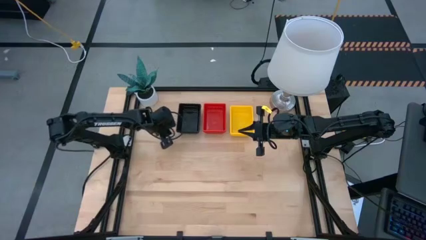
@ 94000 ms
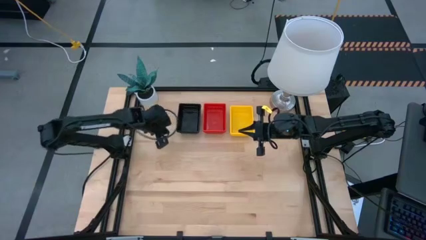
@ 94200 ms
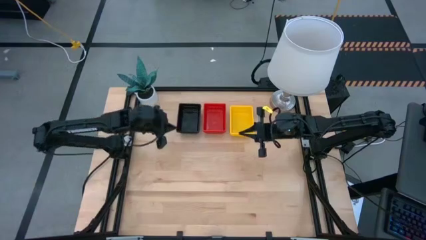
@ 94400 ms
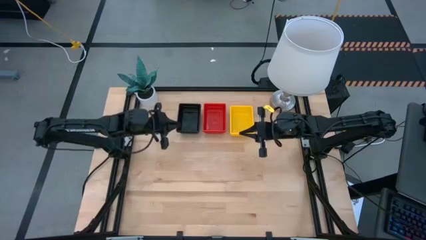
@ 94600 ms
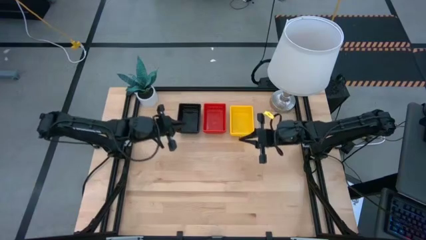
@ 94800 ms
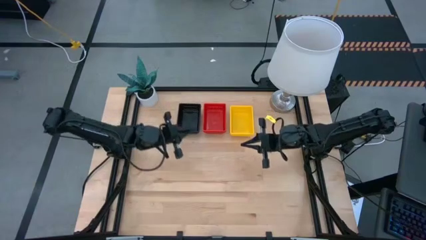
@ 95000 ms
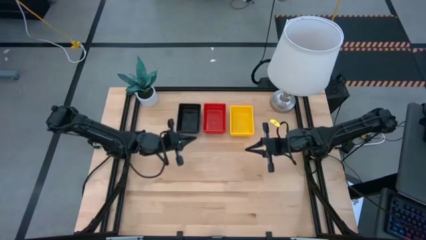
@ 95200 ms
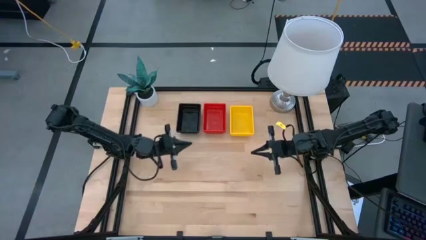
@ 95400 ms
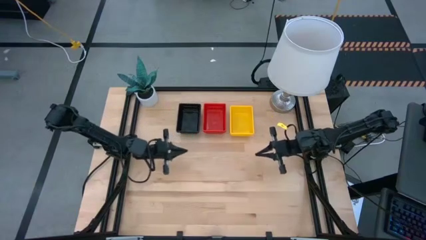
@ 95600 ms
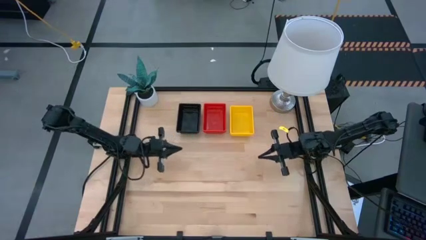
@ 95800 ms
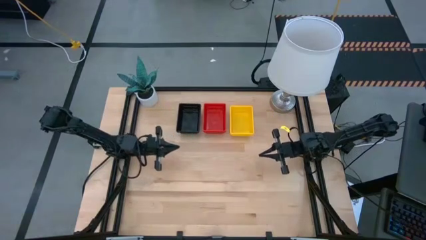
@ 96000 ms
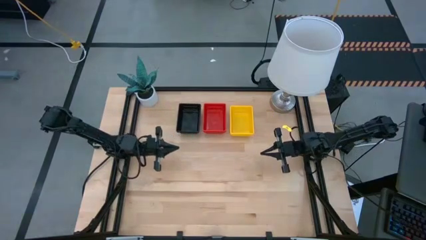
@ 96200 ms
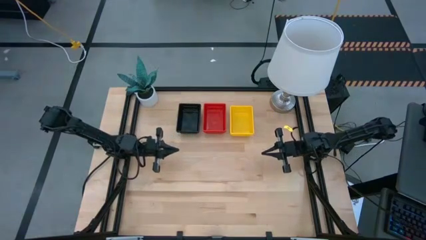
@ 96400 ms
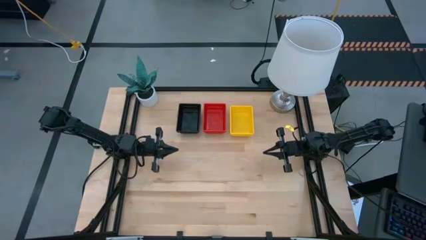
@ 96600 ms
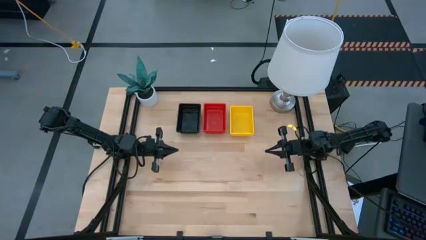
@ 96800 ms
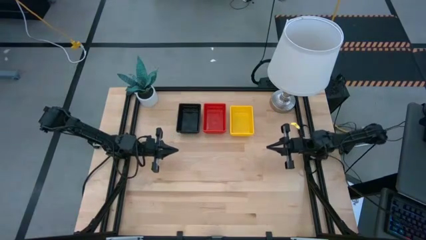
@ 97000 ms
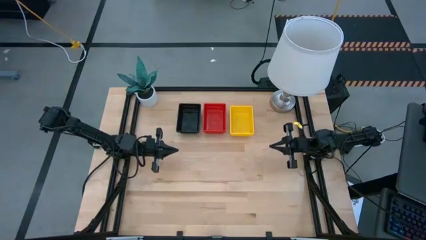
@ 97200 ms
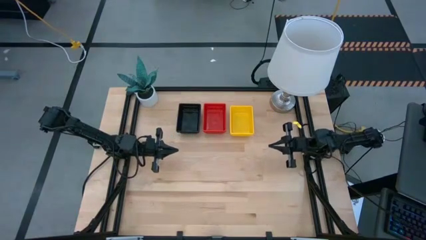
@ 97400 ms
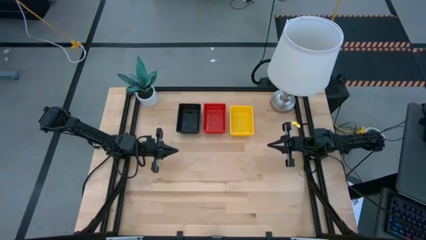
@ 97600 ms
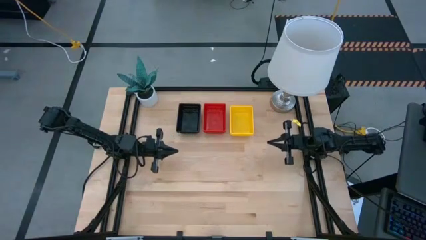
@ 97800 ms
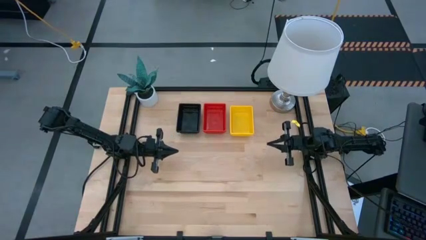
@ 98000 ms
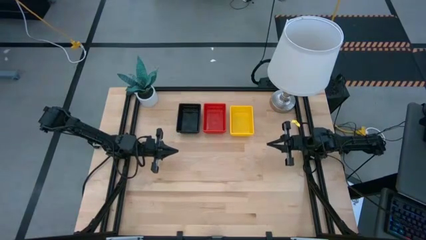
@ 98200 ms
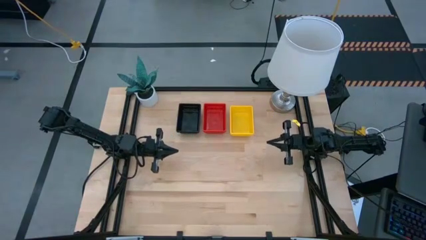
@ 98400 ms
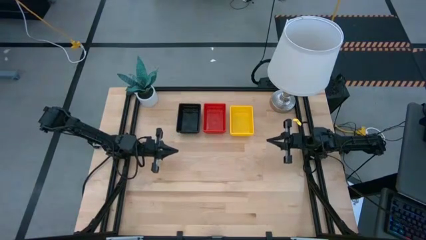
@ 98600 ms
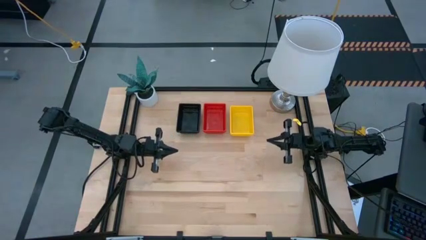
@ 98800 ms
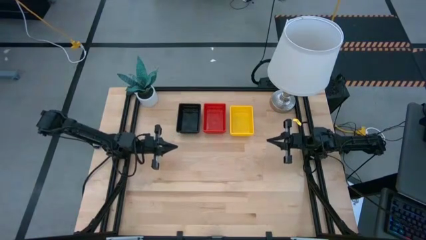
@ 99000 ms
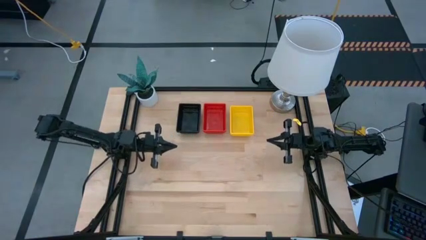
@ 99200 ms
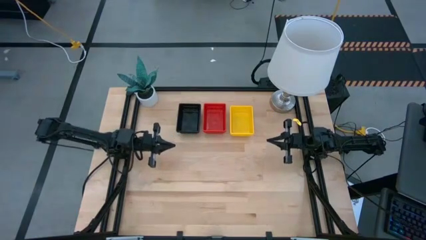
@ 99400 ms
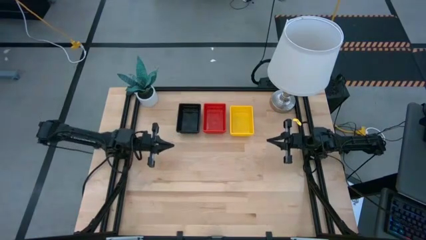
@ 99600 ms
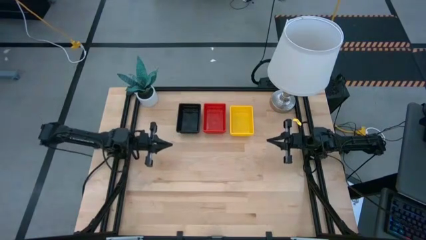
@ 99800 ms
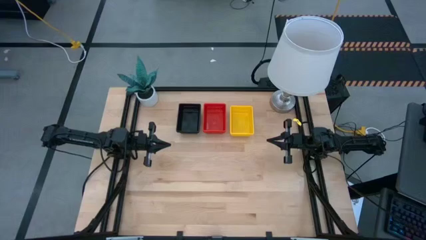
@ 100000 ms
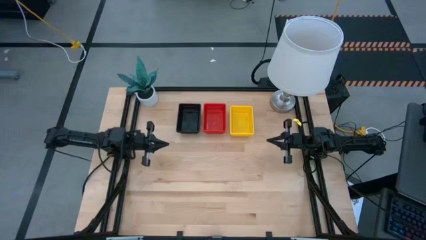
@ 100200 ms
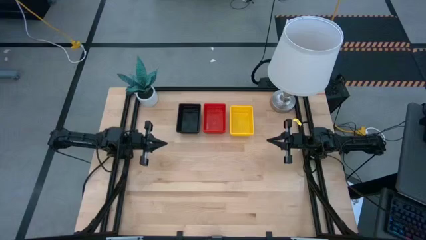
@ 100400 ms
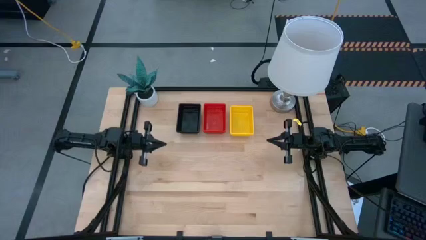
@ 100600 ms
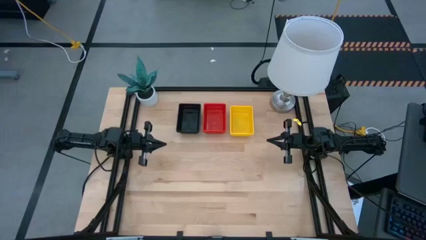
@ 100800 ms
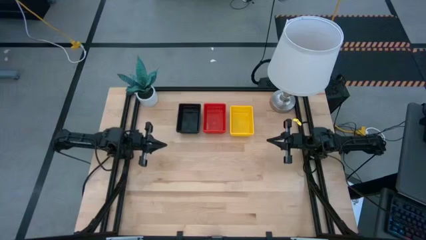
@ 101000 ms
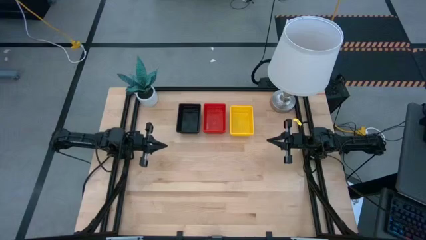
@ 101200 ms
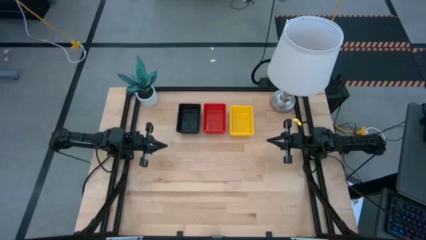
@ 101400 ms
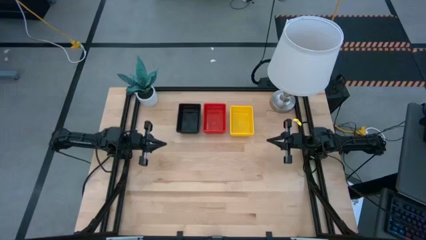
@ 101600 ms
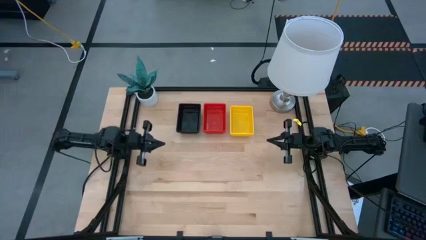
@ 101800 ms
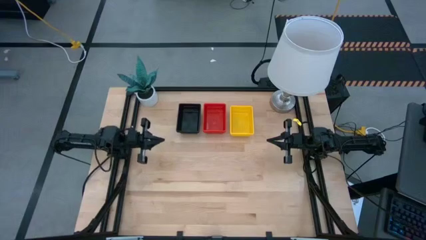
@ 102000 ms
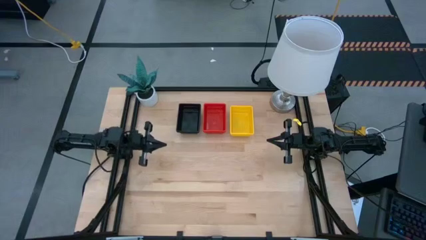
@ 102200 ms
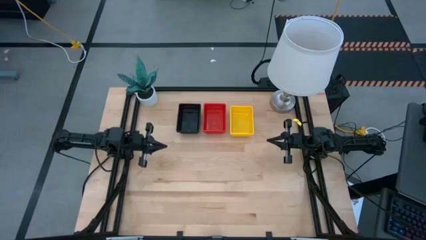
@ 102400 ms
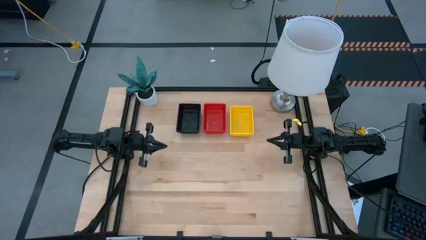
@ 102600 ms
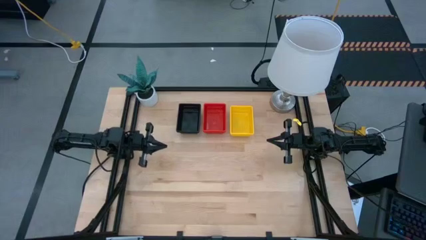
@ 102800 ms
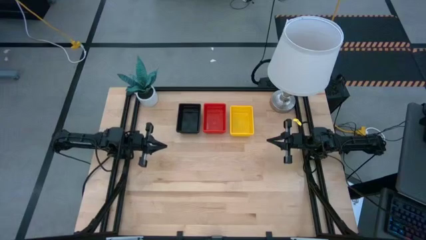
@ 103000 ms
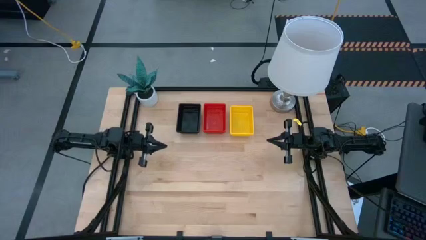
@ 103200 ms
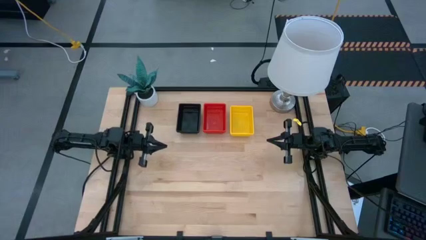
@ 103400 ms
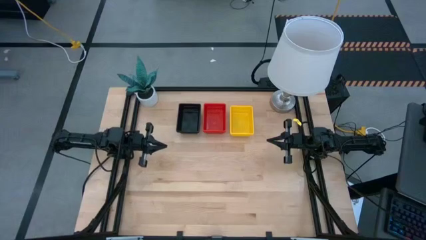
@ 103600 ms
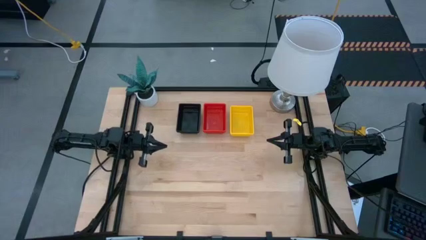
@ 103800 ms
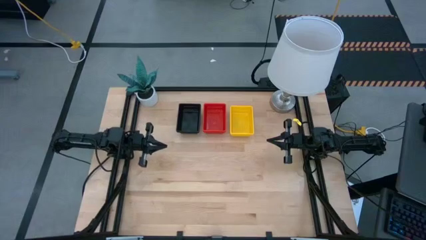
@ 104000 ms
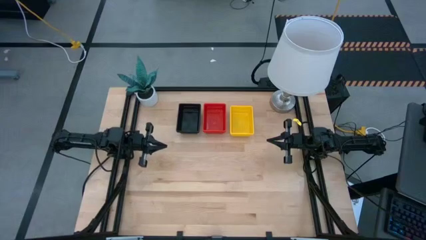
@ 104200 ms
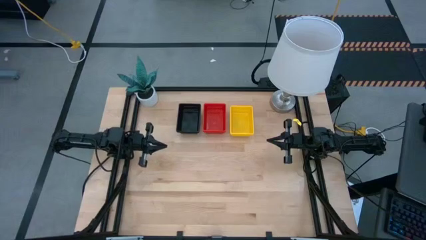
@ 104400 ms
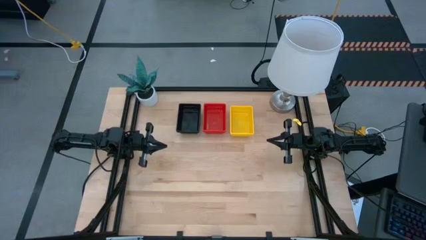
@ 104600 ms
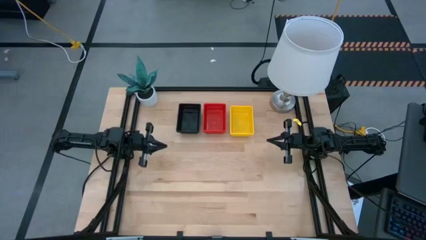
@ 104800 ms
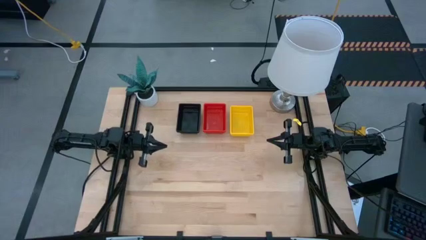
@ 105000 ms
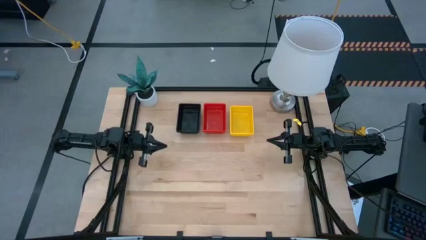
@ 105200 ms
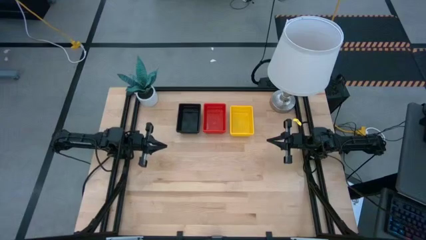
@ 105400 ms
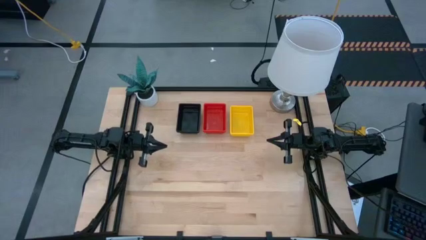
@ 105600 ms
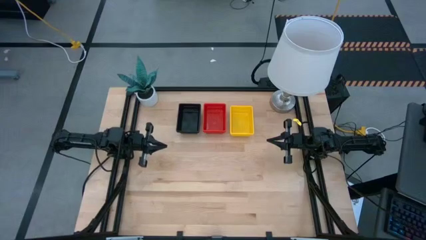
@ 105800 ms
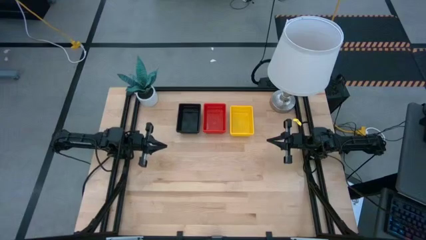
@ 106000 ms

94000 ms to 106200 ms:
Return to Home Position
